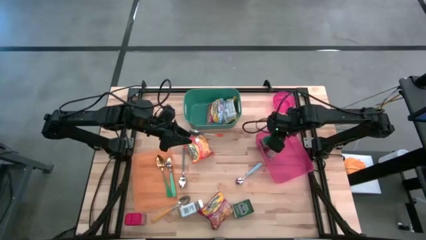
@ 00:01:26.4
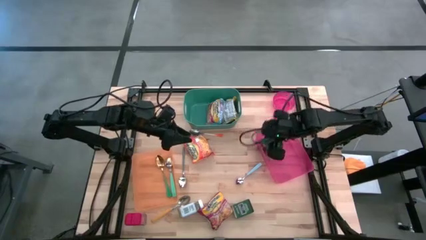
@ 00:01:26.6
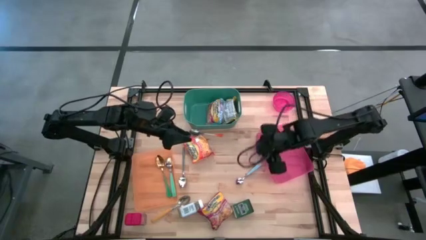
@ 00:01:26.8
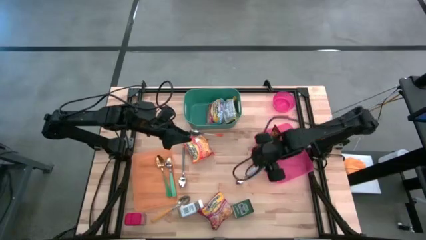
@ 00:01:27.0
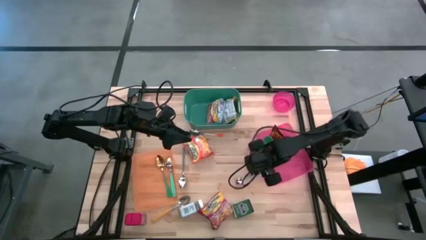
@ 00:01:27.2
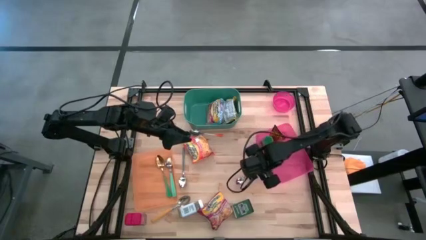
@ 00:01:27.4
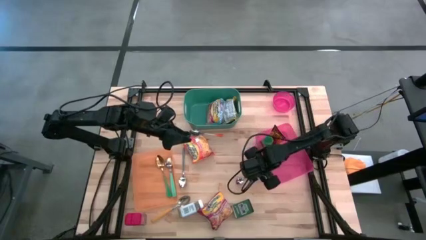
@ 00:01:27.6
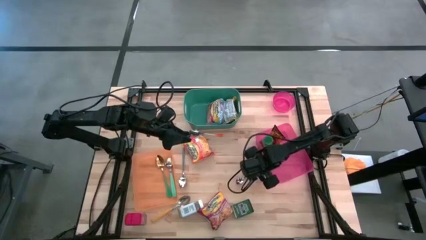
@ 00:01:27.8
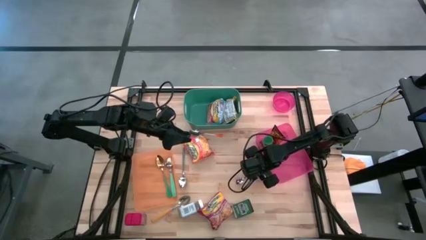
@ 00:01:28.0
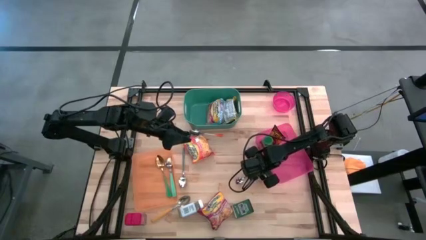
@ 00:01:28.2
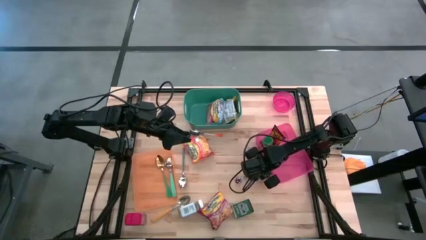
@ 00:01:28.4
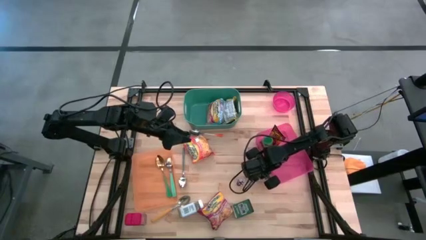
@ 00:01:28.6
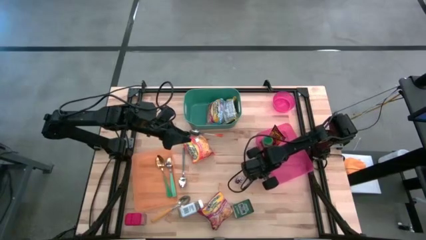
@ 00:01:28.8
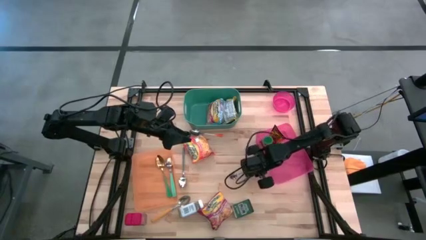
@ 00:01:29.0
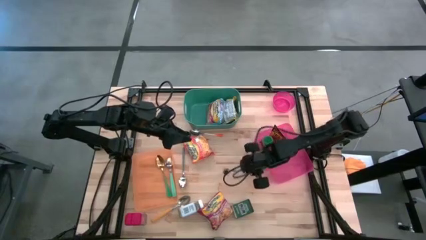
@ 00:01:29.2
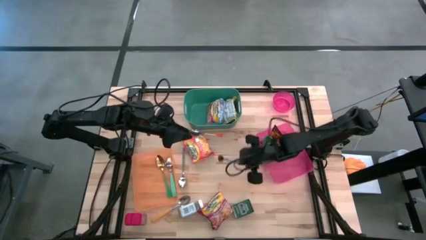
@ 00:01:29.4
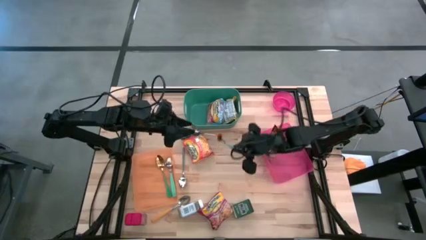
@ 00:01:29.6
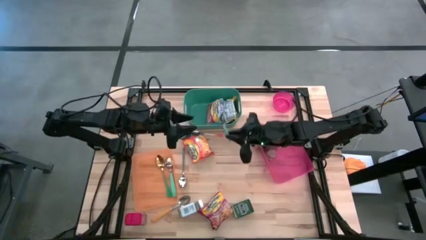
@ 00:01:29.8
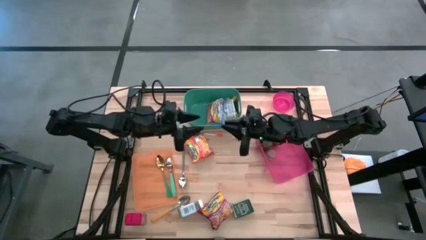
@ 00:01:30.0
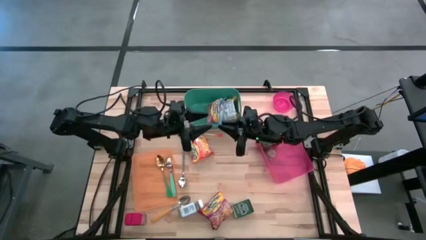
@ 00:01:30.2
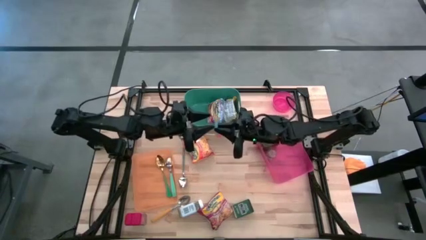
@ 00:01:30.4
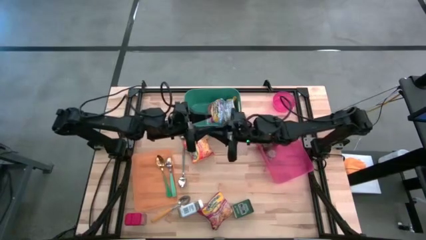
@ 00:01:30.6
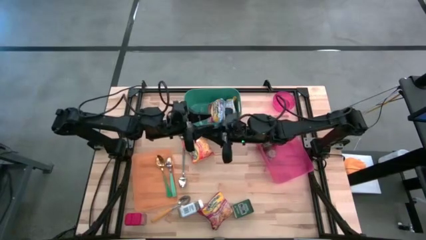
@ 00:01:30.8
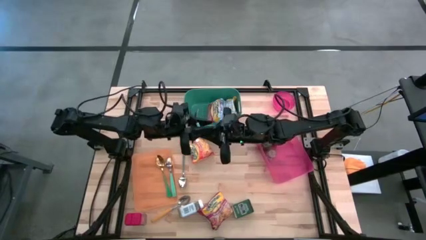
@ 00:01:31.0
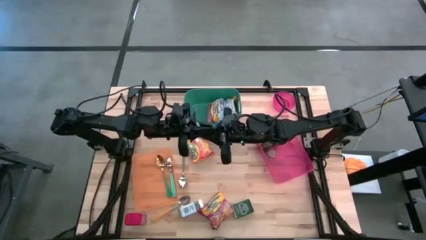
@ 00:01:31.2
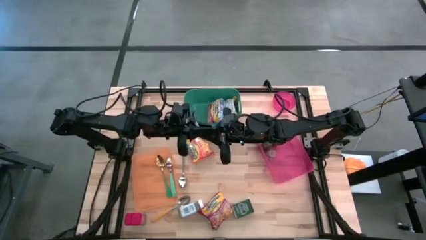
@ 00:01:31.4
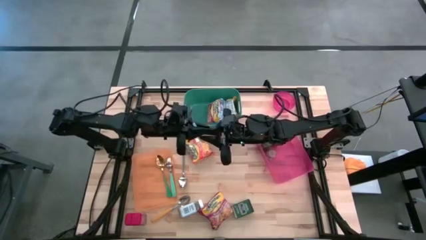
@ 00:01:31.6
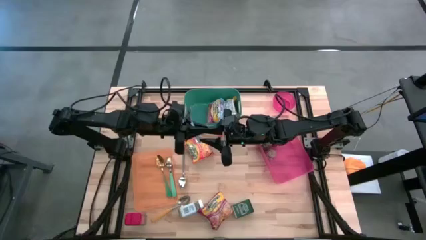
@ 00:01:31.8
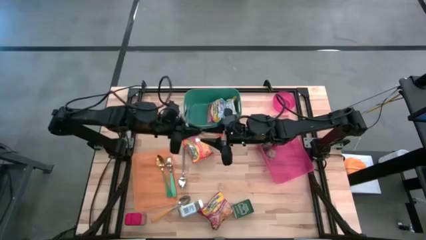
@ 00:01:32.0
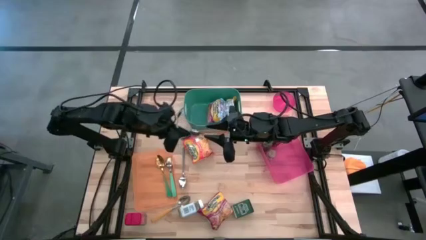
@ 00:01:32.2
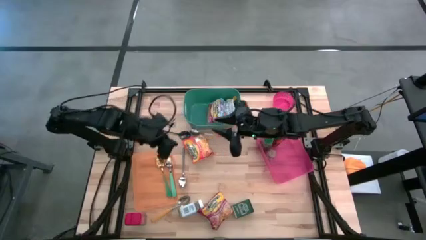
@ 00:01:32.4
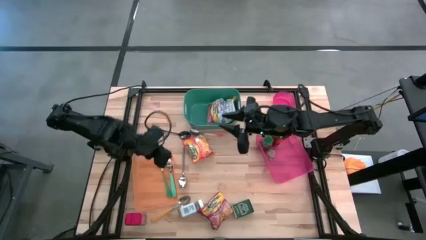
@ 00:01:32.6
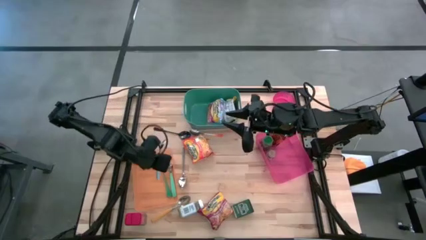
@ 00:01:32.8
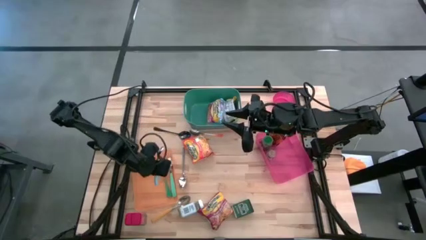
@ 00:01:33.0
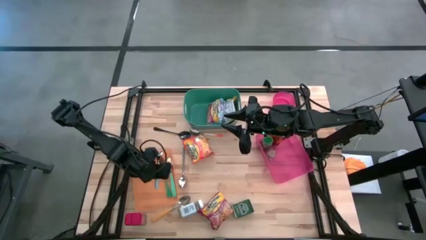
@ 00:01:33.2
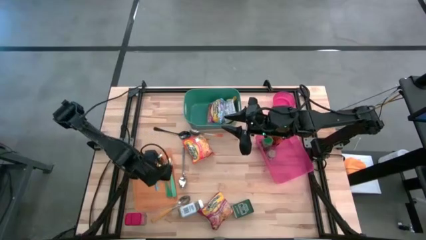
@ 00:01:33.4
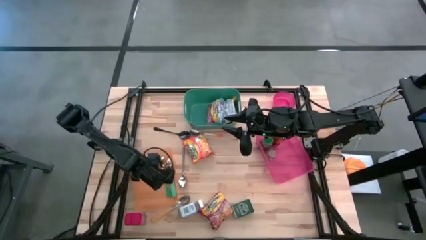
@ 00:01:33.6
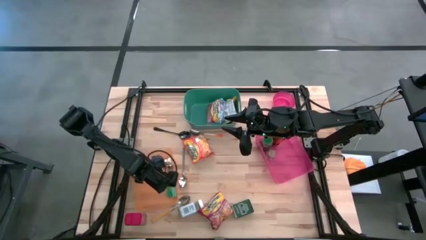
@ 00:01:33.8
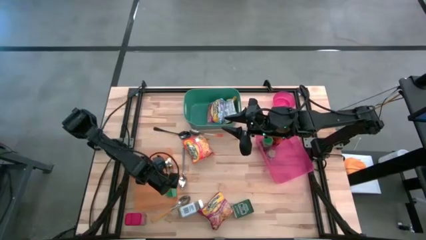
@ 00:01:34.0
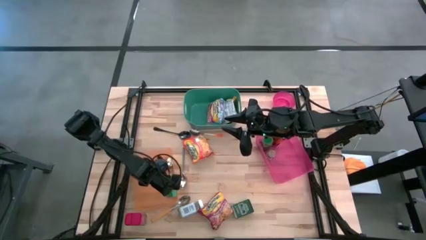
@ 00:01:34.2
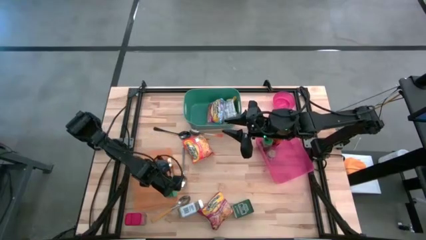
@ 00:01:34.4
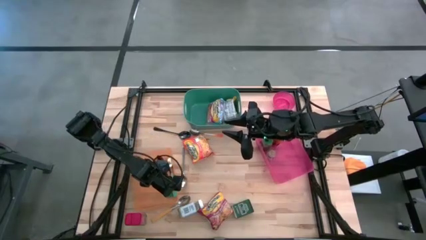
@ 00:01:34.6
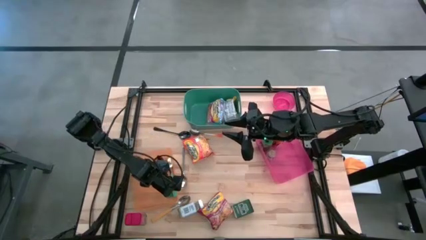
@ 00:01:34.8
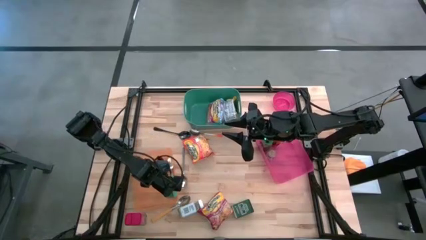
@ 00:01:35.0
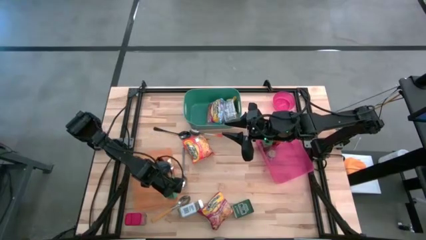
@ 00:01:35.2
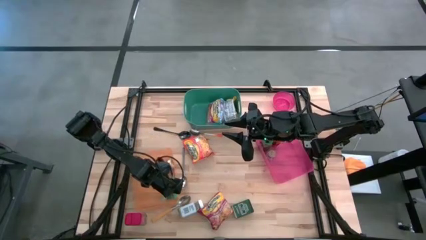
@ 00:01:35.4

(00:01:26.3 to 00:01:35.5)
Put the light blue spoon into the orange bin

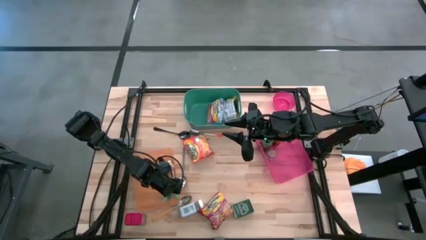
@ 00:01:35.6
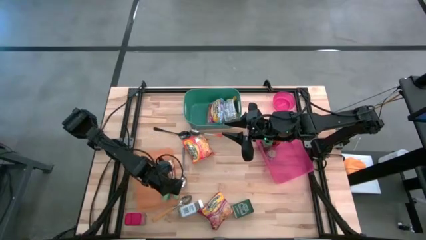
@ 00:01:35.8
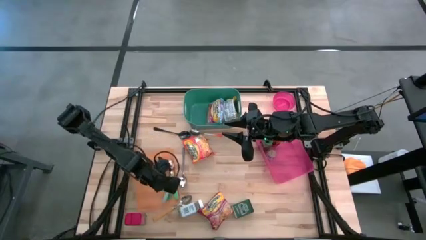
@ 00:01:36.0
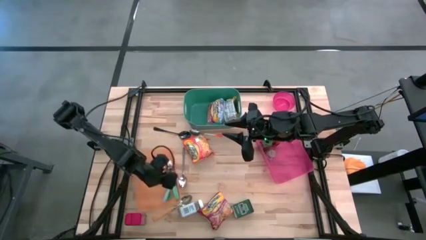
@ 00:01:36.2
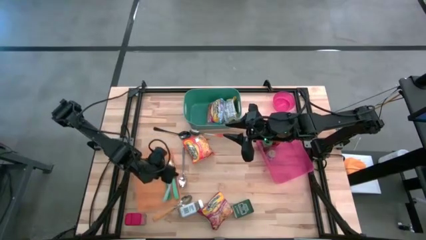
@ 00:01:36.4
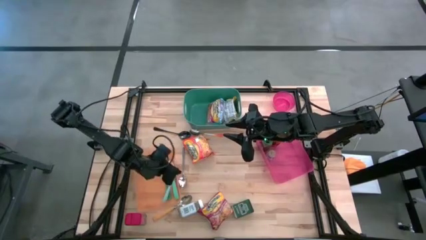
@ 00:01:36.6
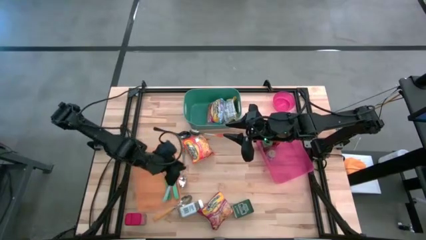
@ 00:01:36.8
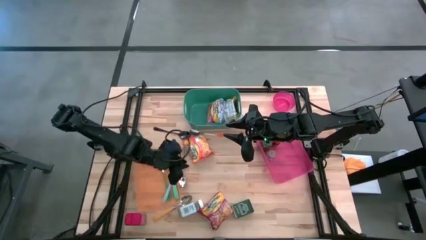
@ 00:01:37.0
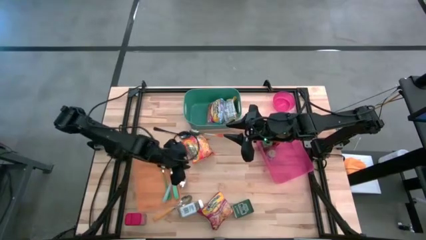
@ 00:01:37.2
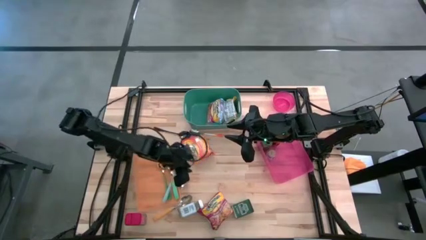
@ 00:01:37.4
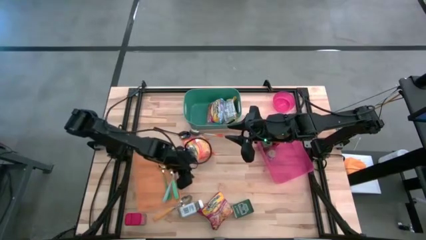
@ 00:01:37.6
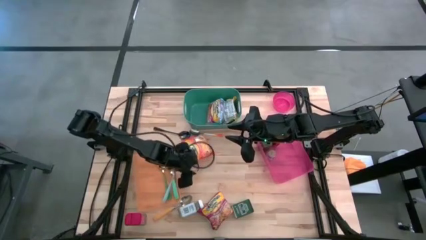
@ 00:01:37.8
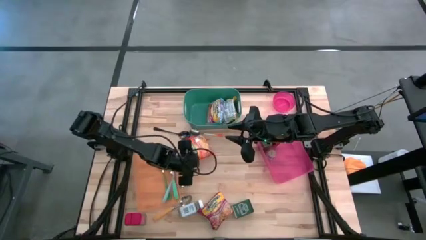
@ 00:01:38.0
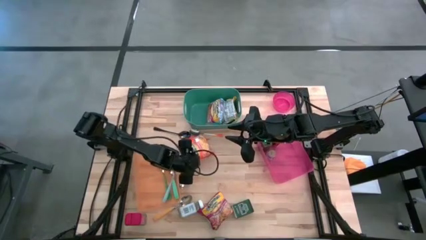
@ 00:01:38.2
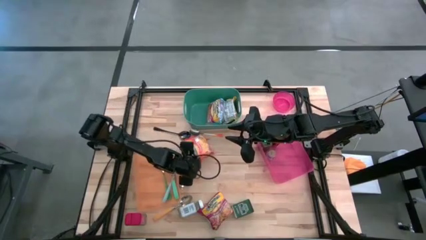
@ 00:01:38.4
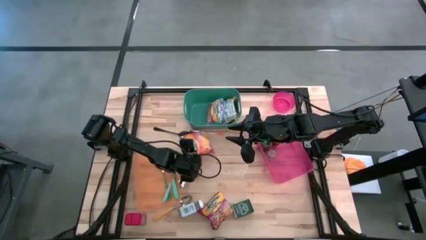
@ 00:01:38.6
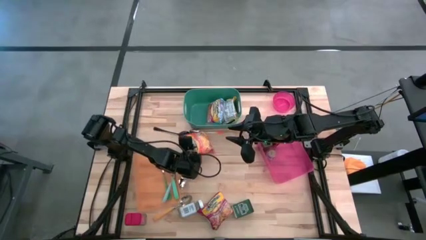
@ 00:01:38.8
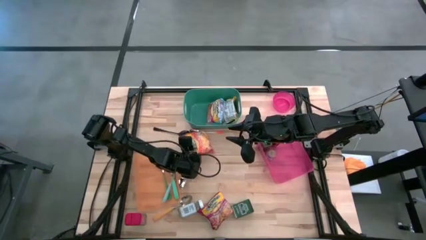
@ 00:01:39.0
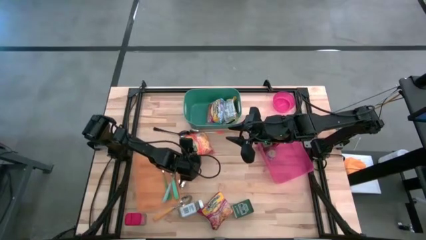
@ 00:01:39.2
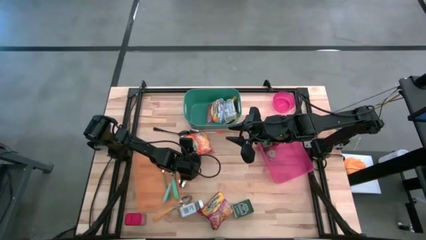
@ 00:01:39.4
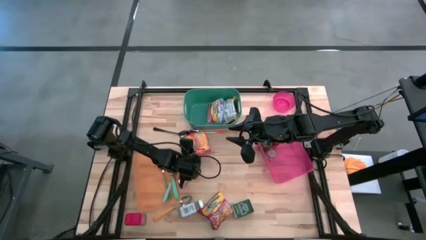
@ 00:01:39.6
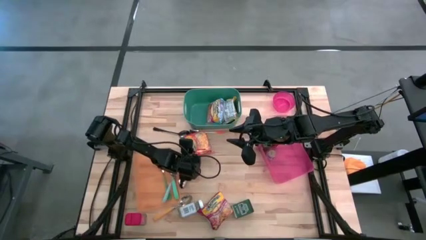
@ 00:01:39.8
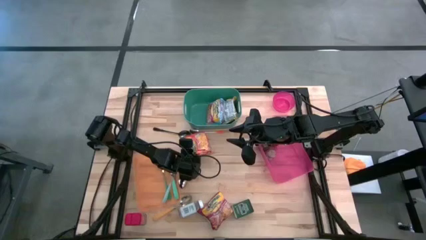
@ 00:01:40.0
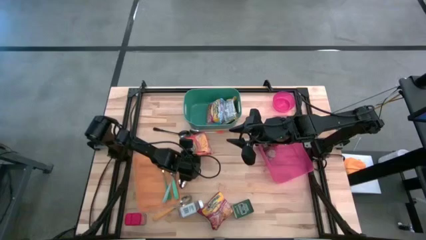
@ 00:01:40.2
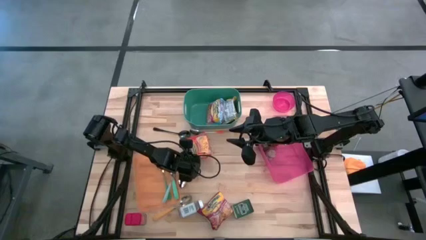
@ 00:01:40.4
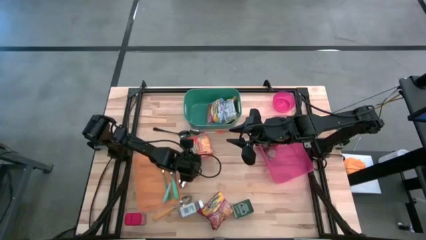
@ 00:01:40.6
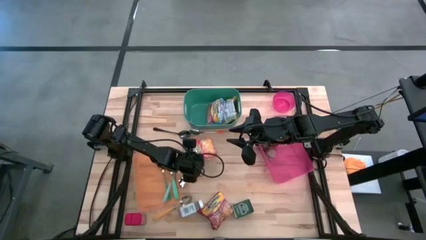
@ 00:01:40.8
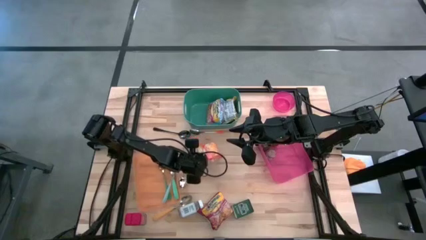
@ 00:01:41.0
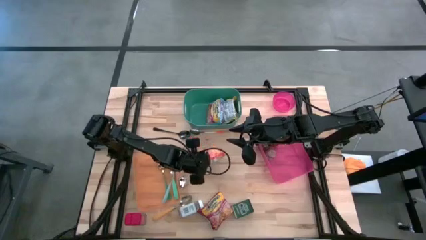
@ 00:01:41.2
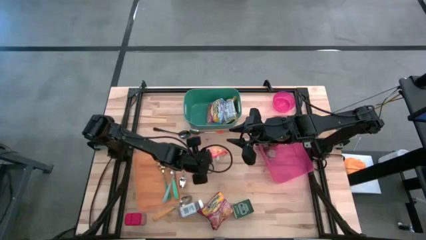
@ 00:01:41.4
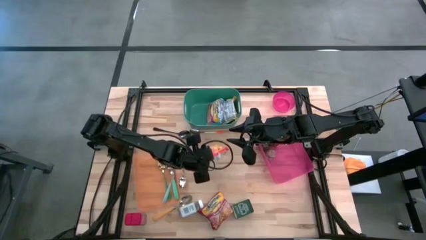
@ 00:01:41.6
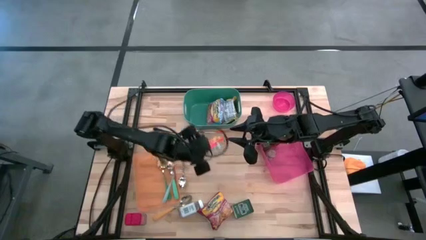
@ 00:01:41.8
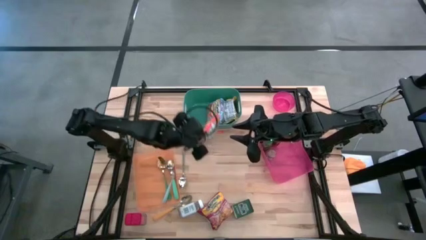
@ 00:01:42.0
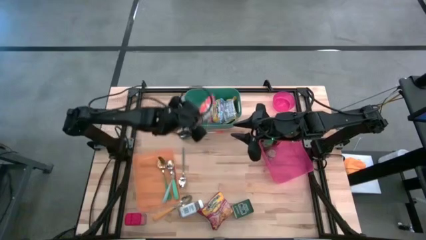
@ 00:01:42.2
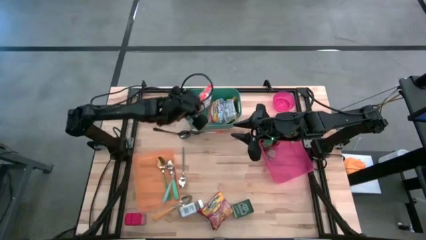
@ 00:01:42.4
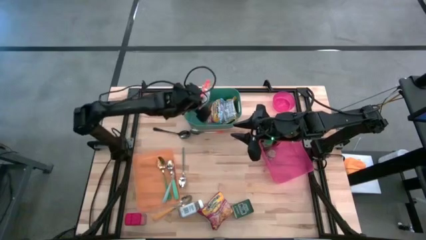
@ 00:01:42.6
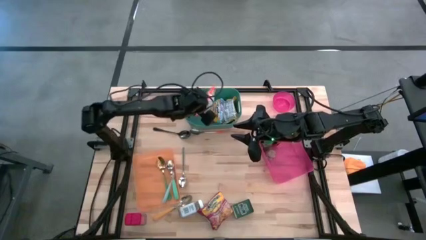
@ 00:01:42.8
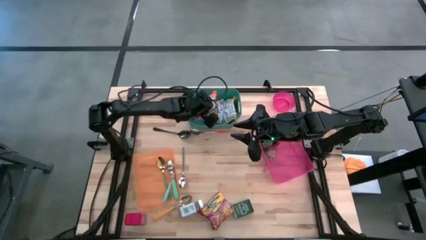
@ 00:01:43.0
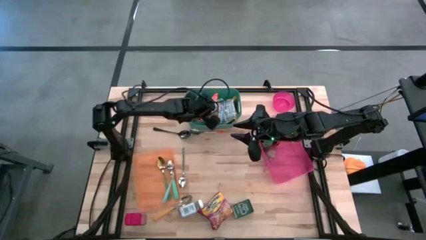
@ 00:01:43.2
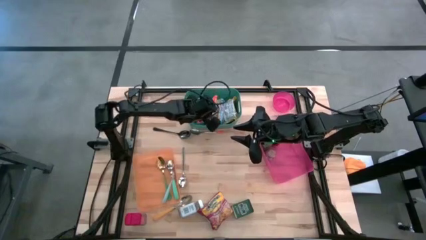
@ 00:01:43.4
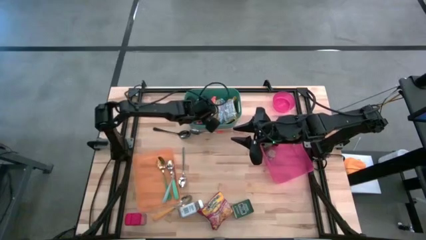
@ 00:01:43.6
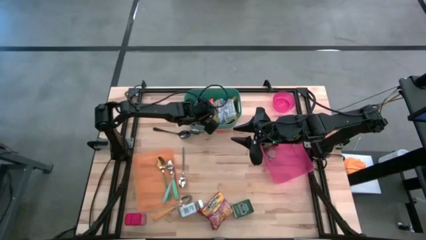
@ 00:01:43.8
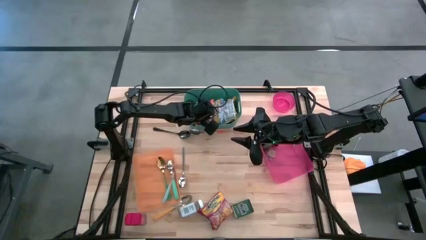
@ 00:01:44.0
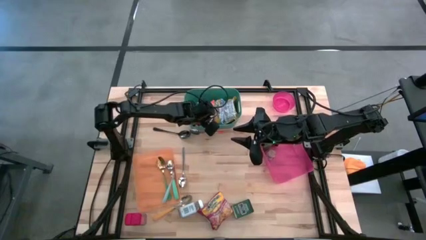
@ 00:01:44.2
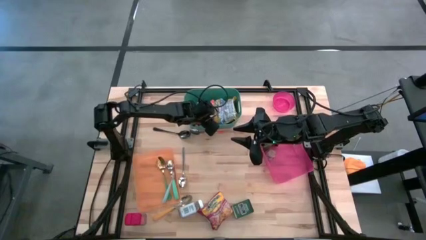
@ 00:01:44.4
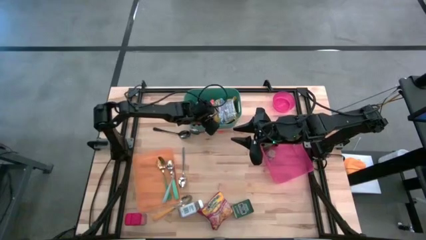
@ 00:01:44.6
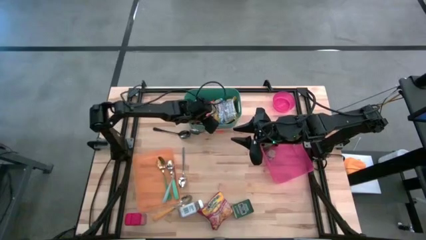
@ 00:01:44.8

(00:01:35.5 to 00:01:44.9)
Put the orange noodle pack into the green bin
